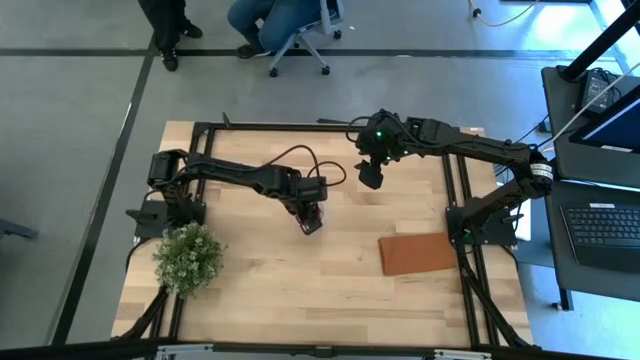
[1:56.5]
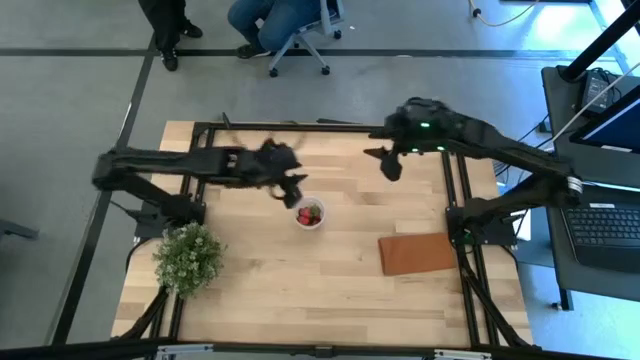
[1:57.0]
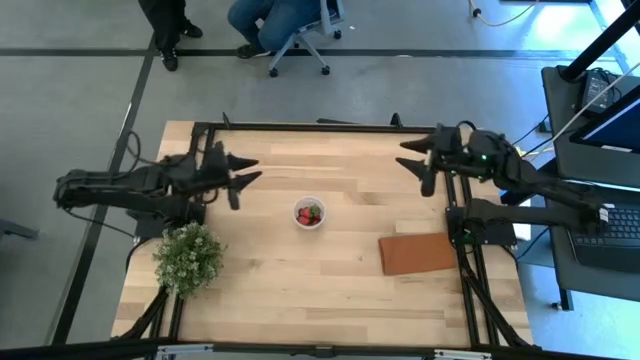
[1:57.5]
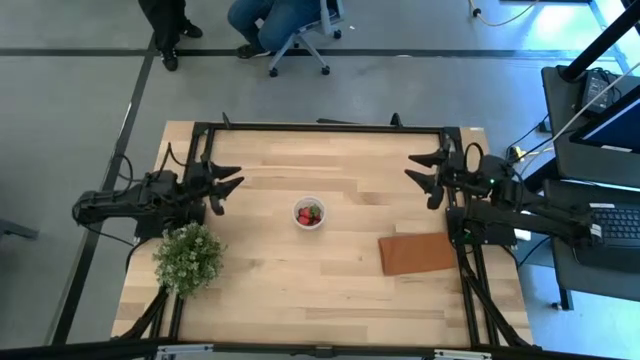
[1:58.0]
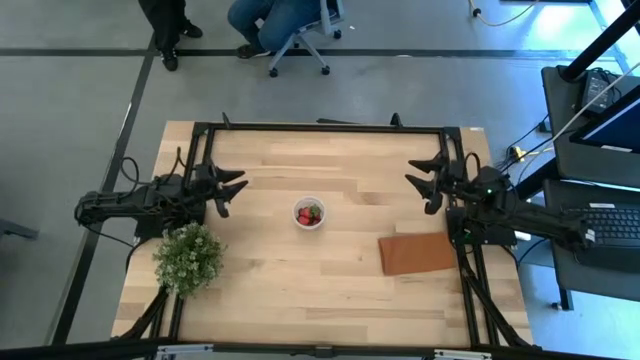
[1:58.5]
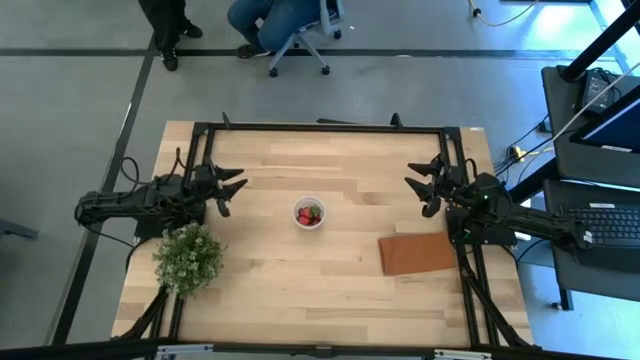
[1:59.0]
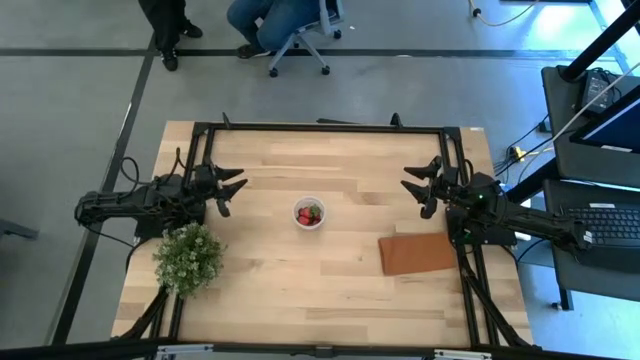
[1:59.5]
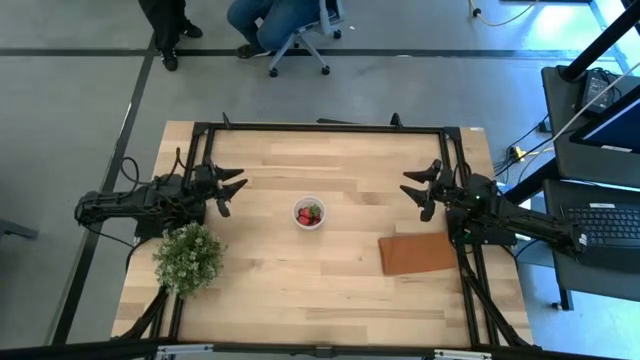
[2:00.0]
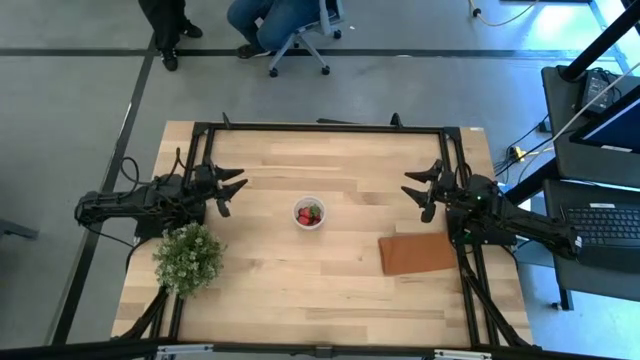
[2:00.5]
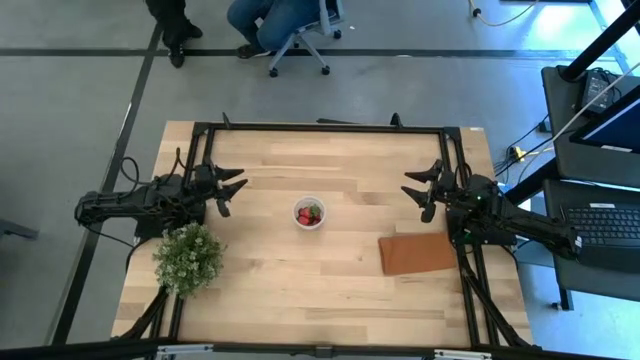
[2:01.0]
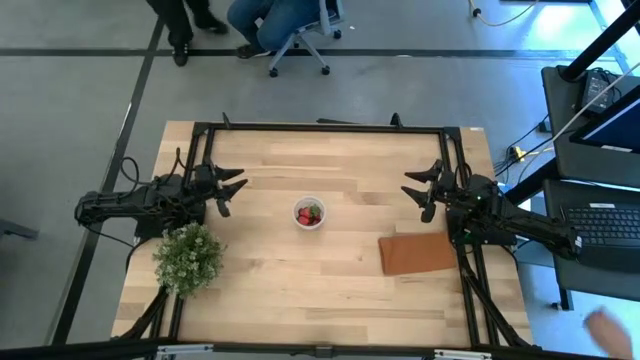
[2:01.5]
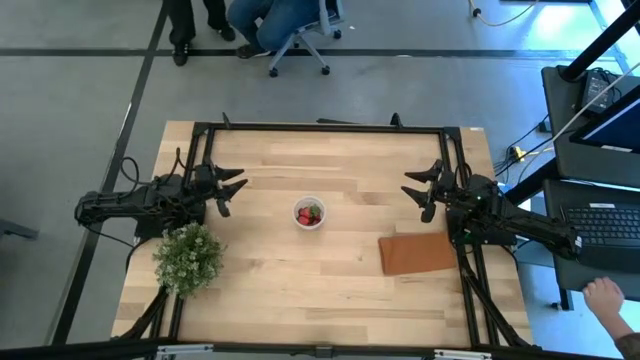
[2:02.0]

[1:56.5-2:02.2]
Task: Pick and placing Produce into tupperware
Return to Home Position

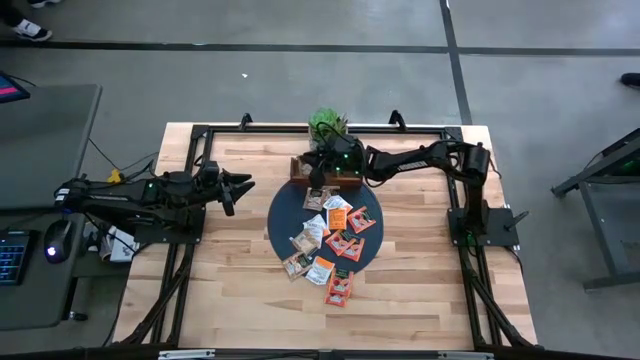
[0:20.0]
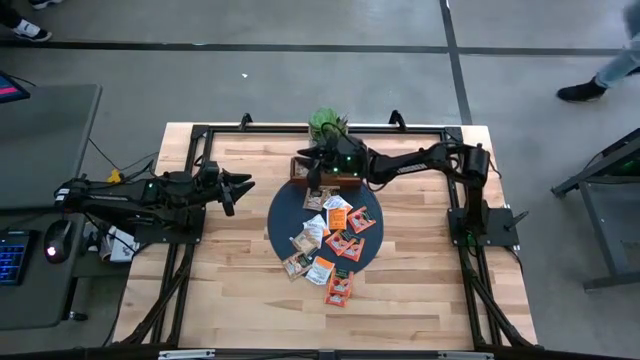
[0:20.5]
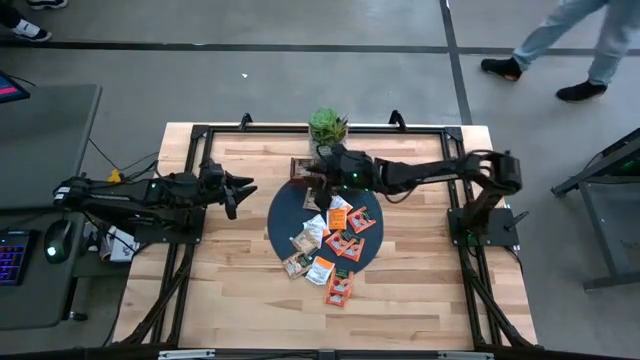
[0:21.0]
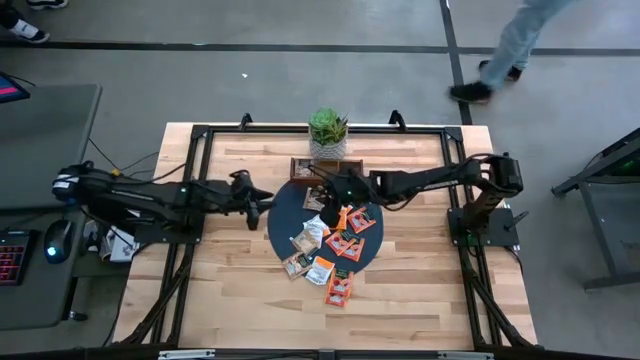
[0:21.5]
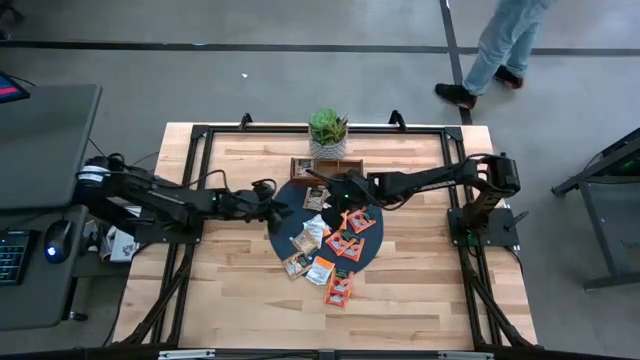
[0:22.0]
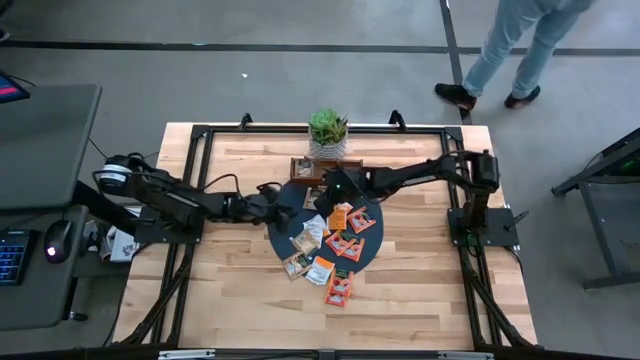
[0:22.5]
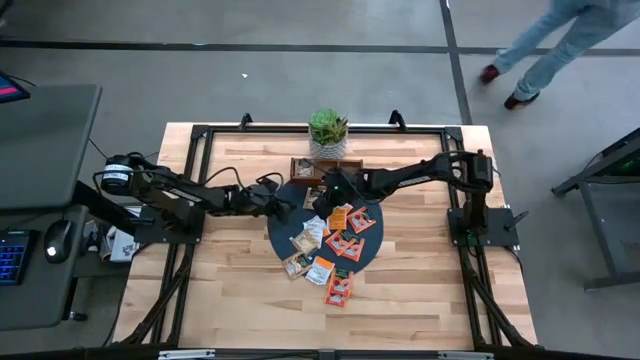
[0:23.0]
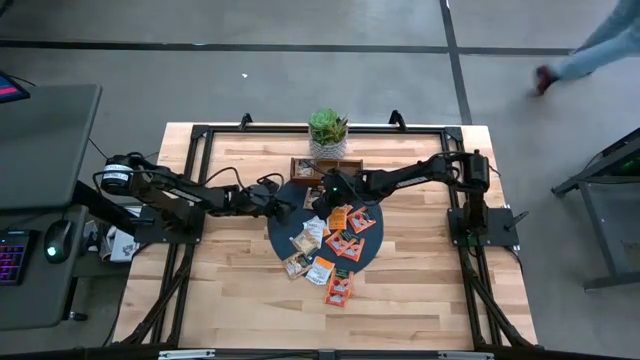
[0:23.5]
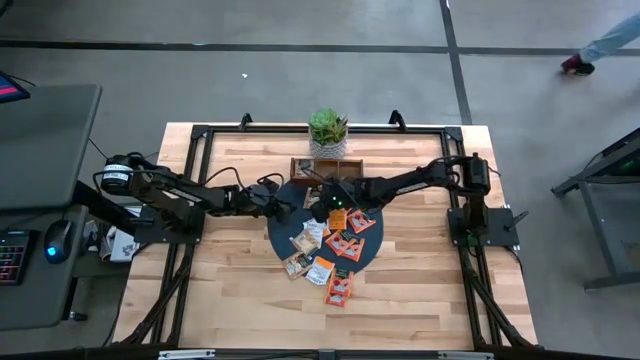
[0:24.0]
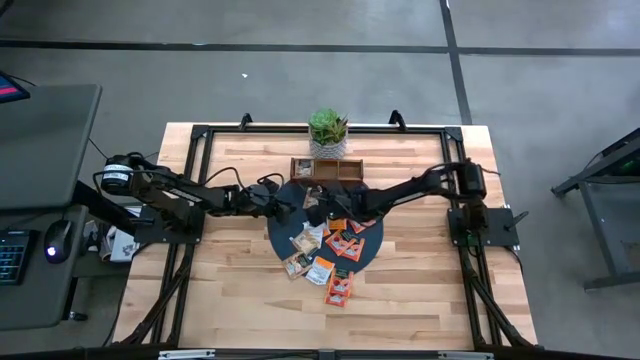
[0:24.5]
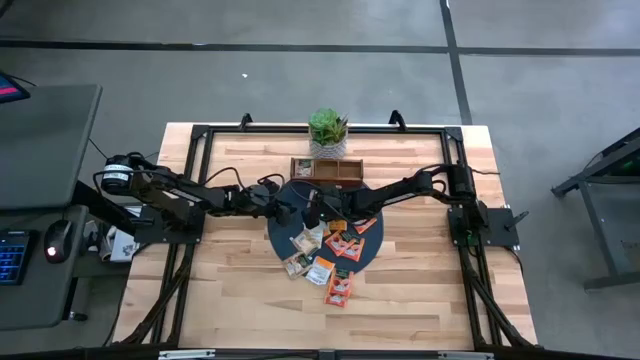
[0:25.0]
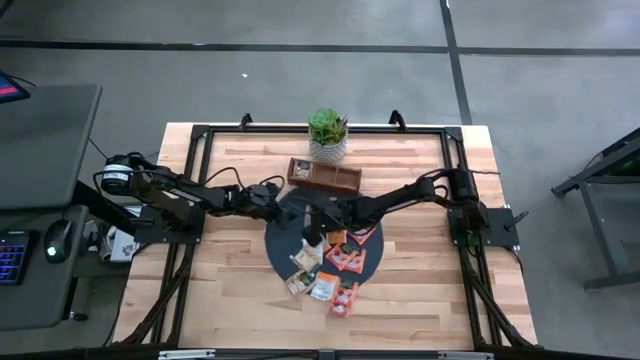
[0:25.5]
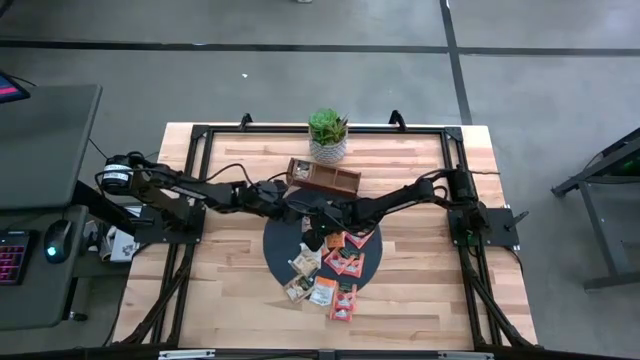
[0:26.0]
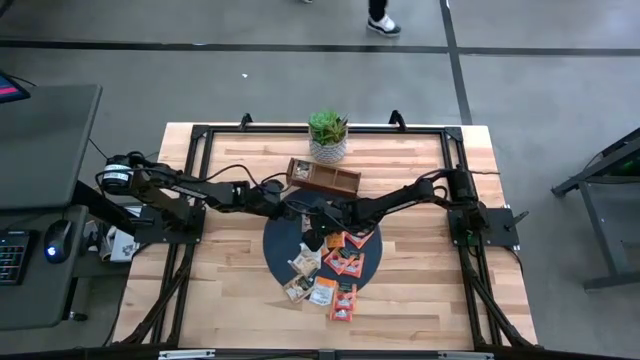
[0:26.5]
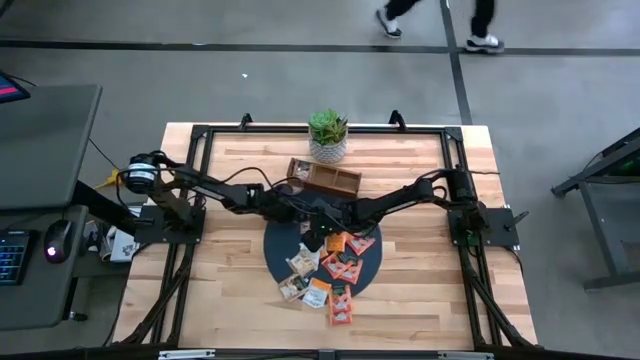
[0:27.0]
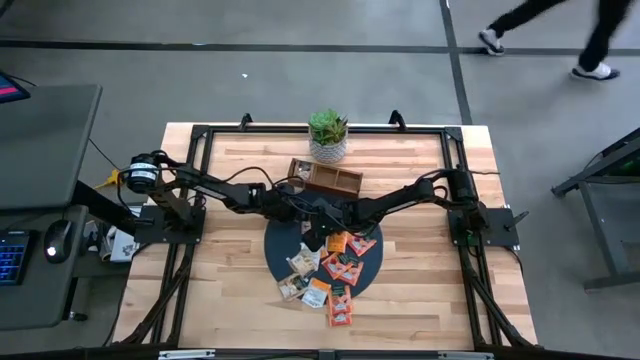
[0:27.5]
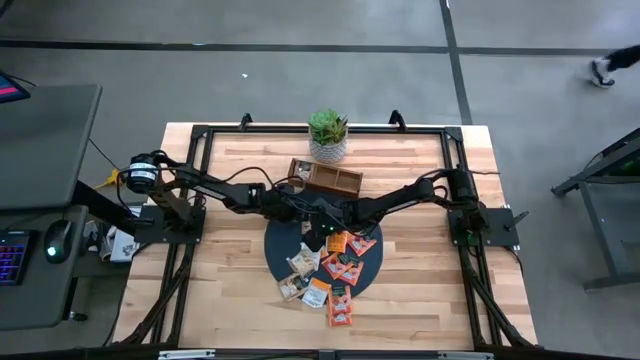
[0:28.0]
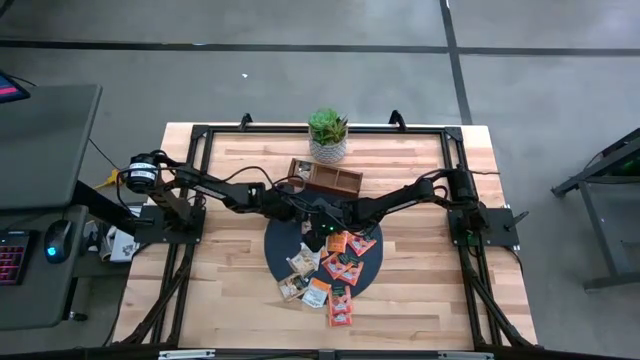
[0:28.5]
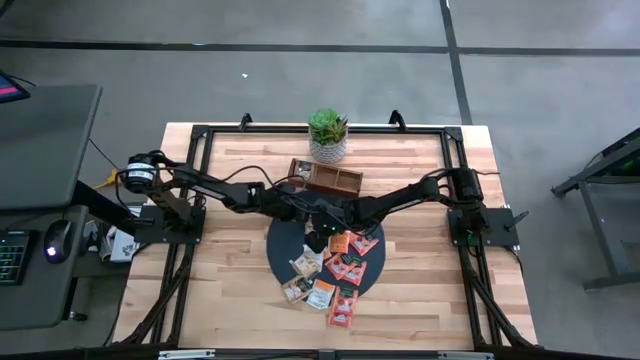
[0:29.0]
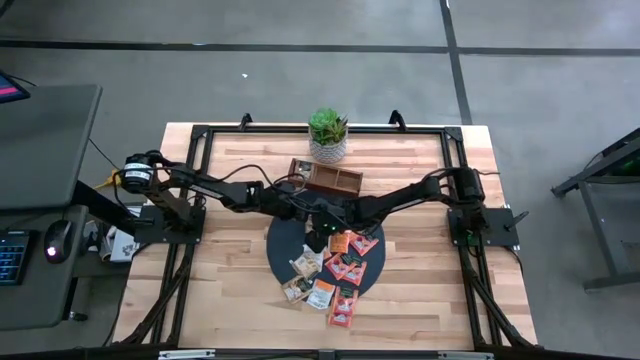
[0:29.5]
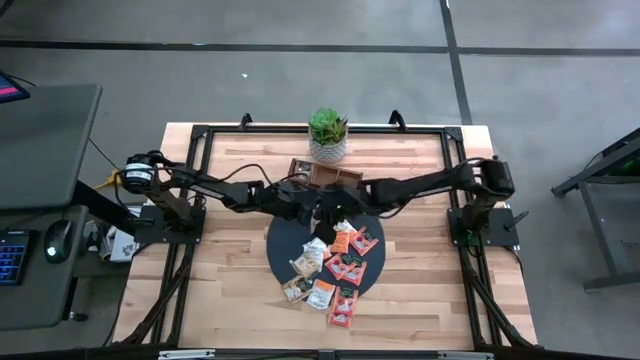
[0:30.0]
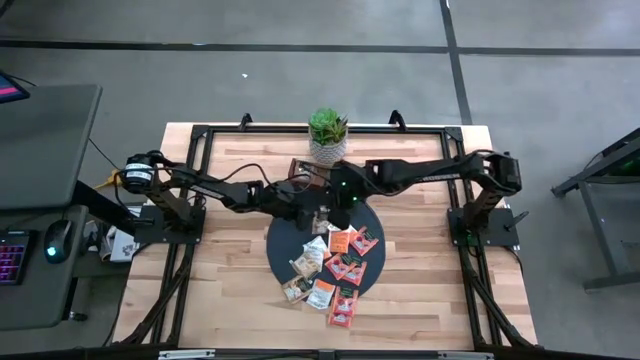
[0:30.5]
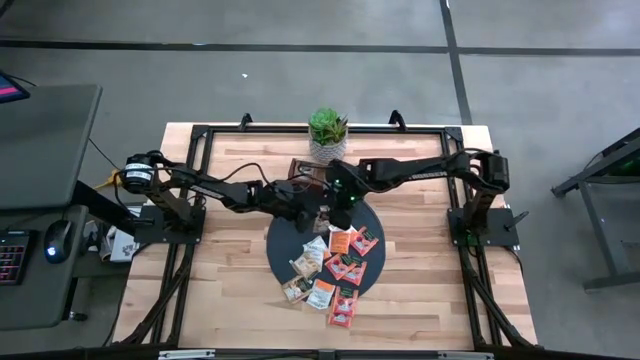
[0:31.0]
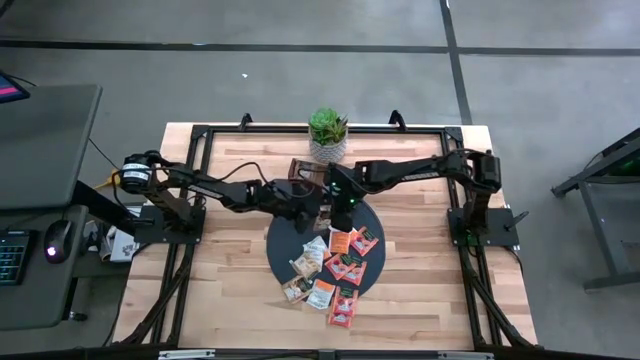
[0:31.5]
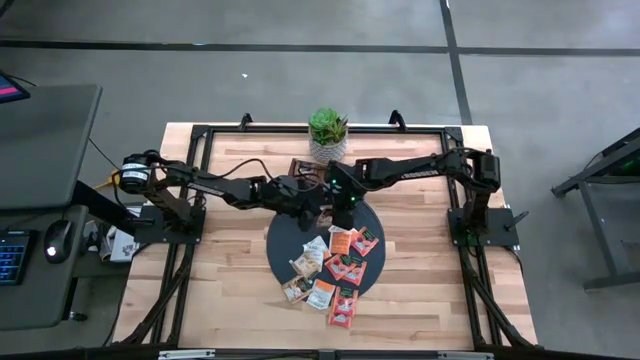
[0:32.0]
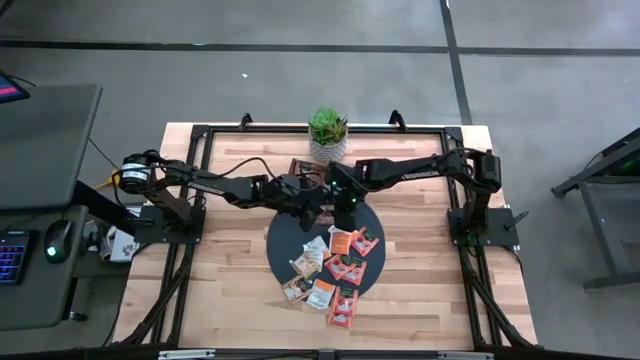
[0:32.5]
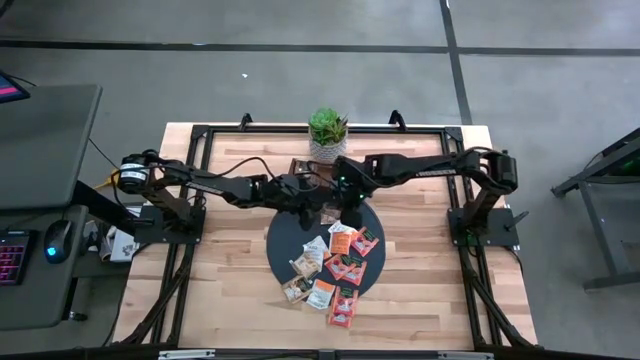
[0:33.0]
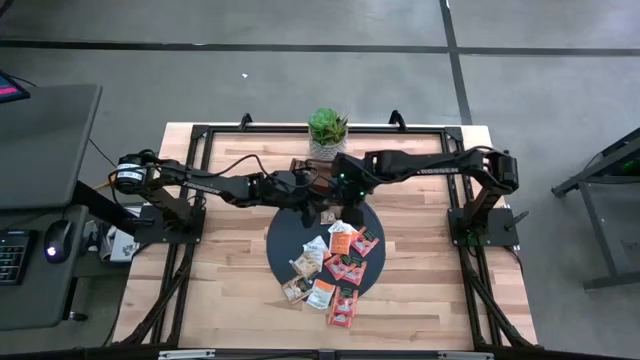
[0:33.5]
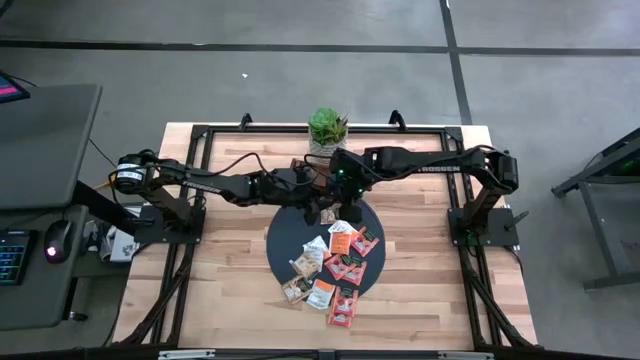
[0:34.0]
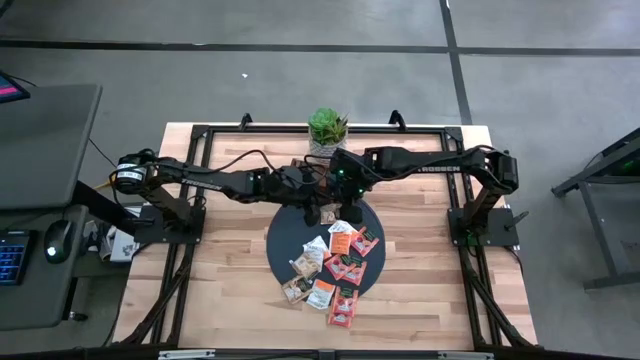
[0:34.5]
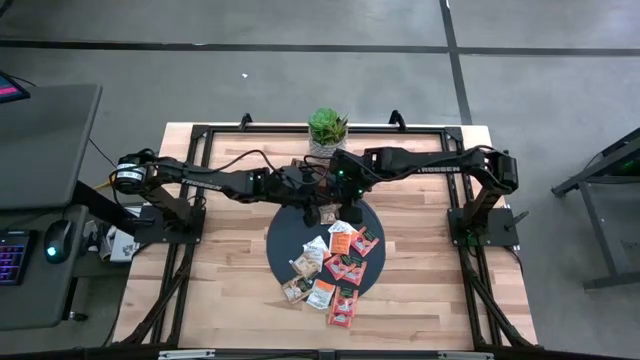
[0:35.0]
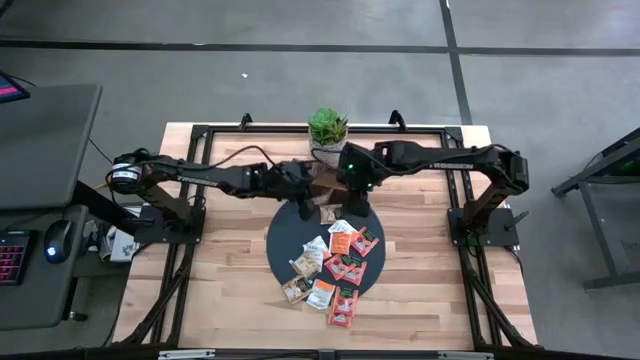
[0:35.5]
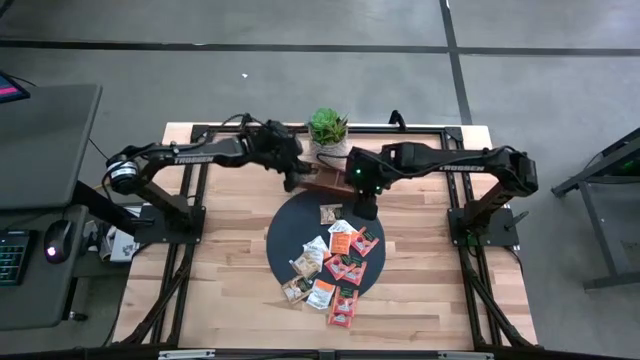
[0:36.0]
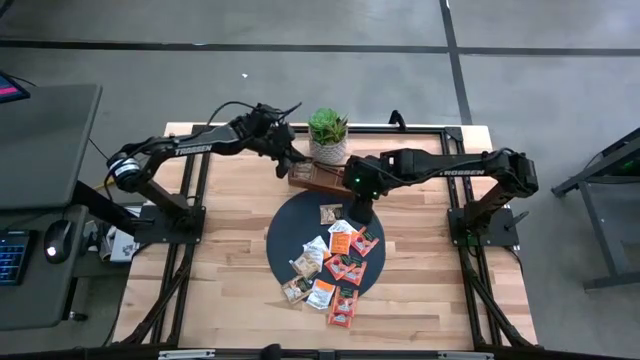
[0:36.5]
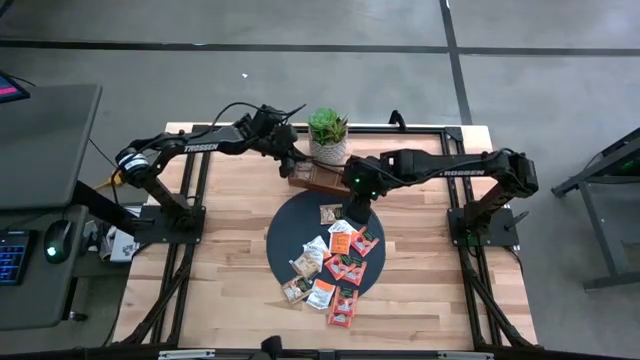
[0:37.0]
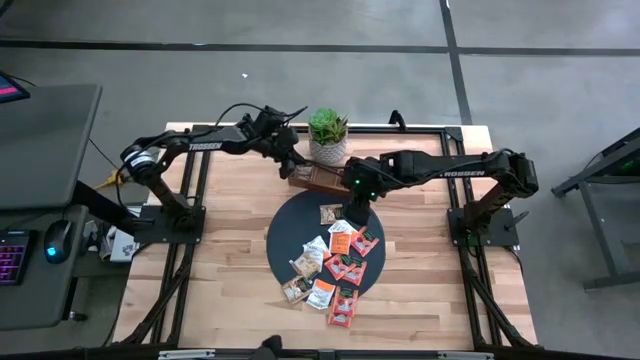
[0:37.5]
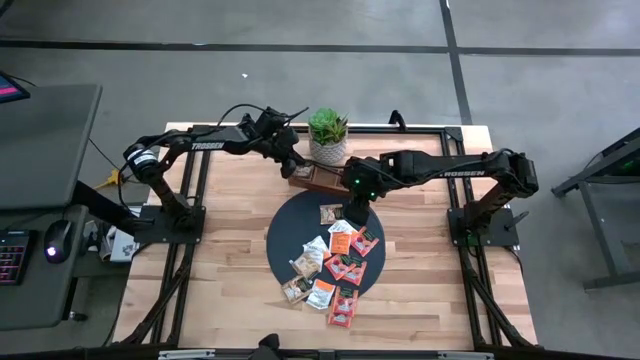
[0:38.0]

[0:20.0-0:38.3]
Task: Pick & Place Tea
Put the brown tea bag into the left section of the wooden organizer
